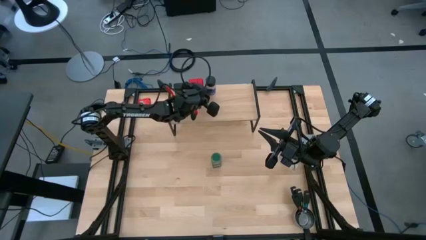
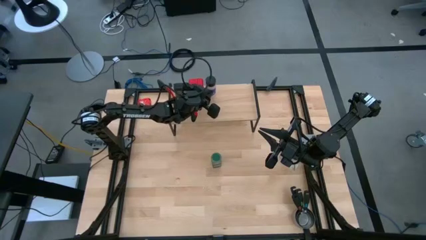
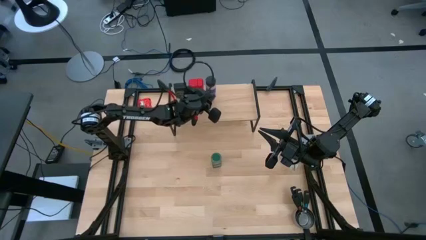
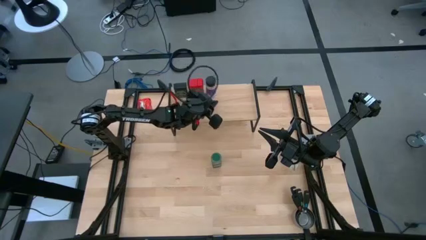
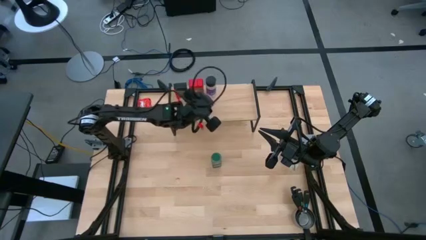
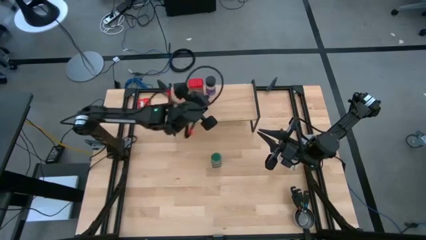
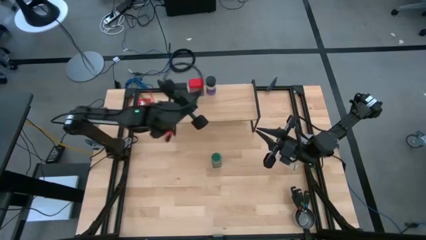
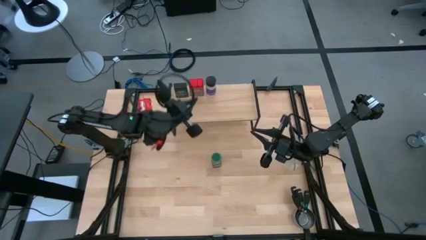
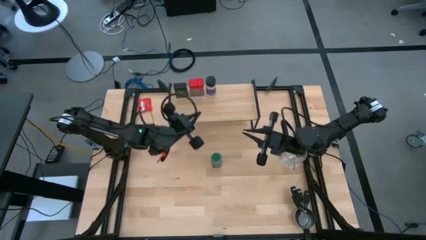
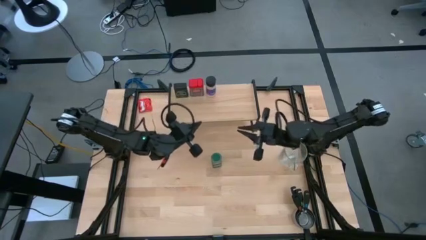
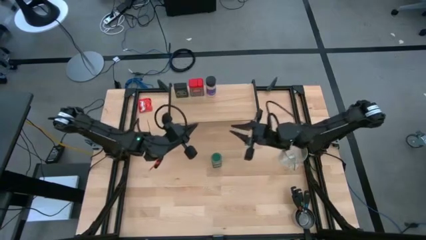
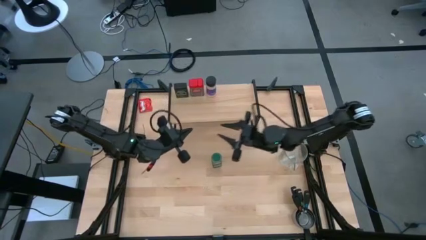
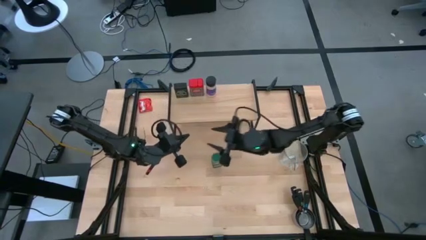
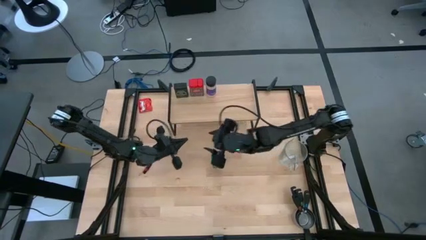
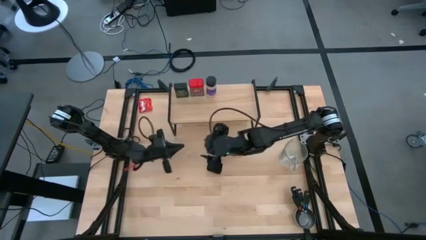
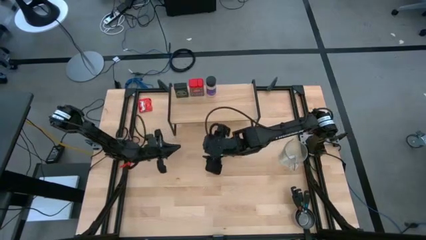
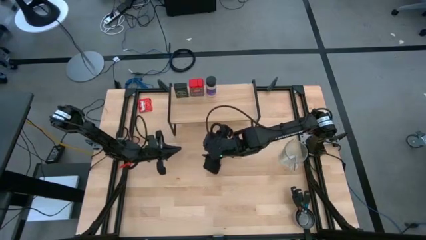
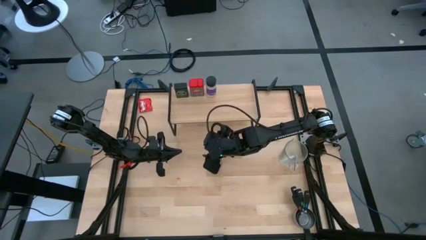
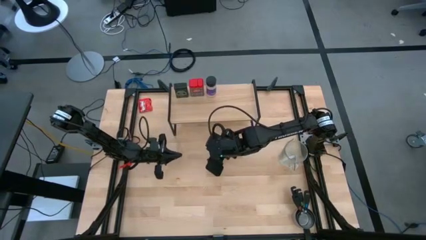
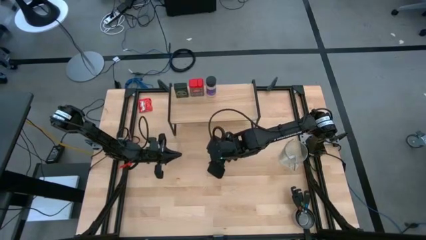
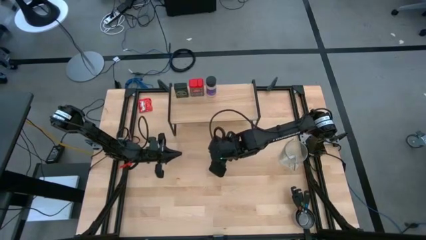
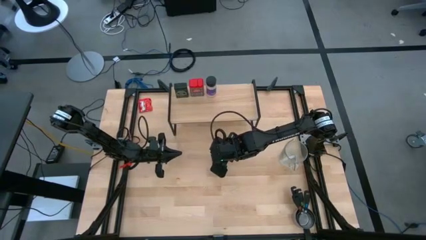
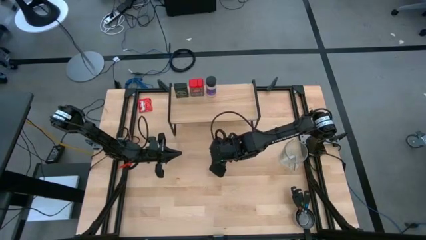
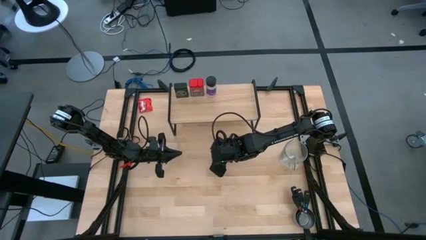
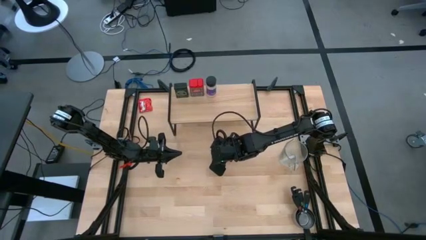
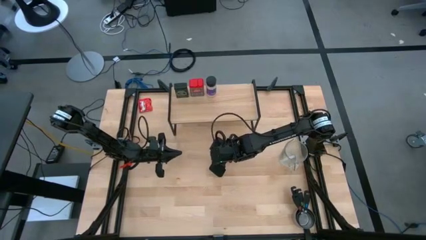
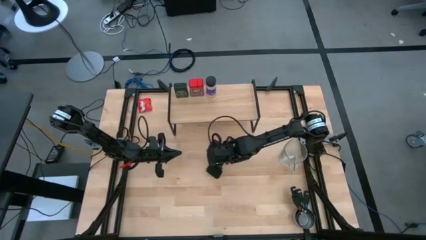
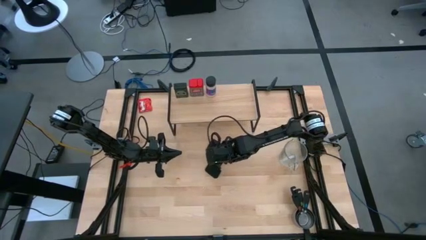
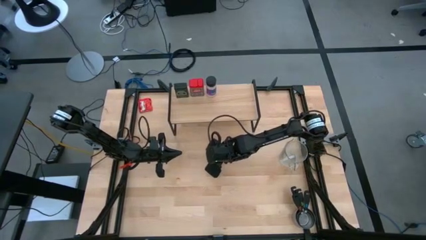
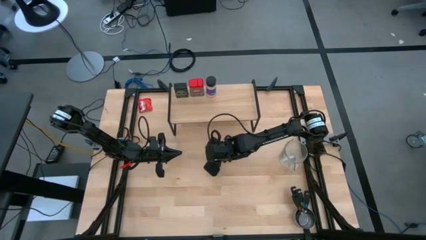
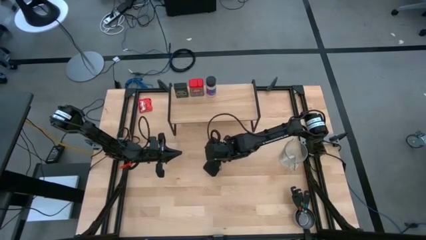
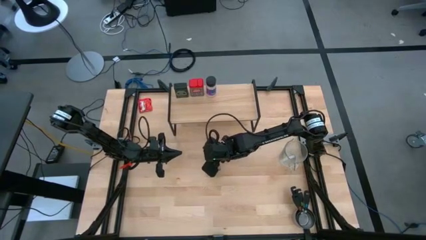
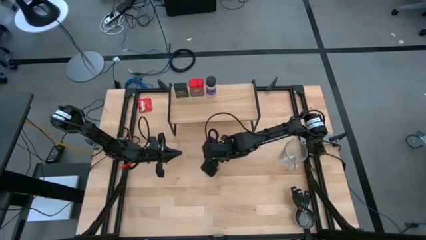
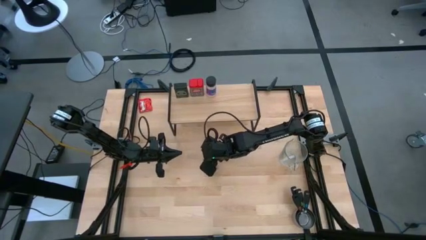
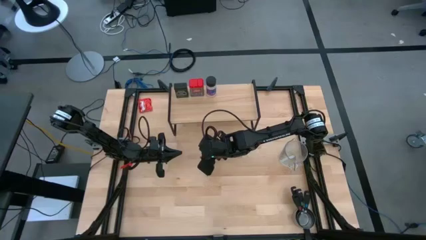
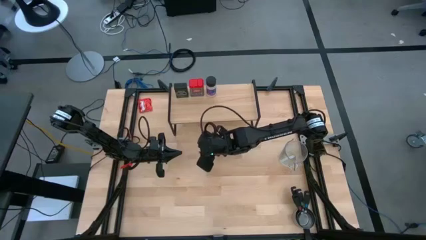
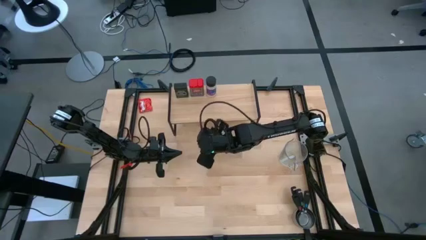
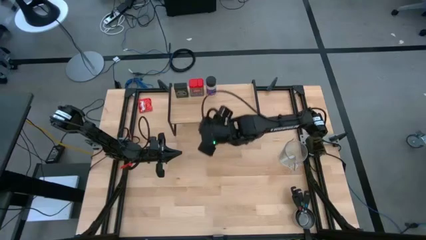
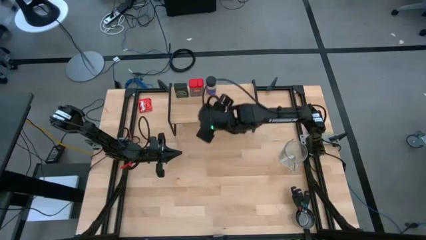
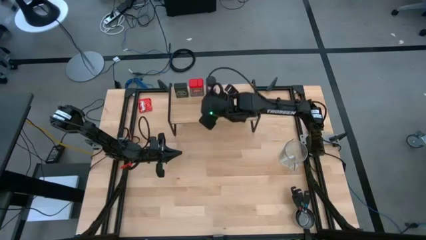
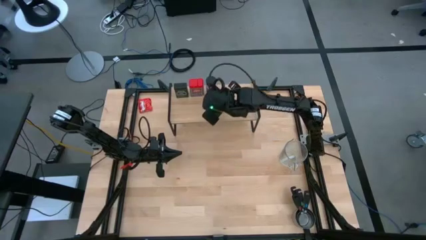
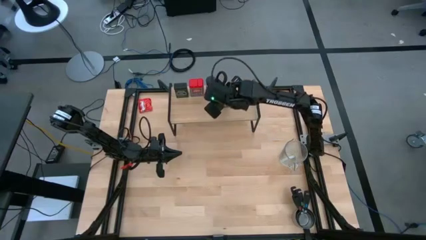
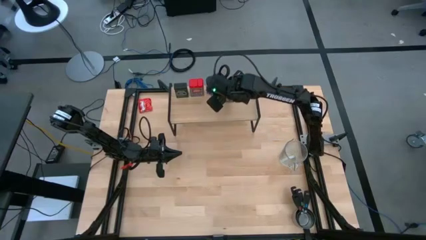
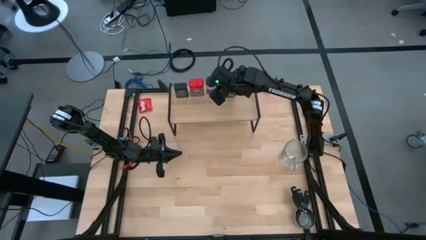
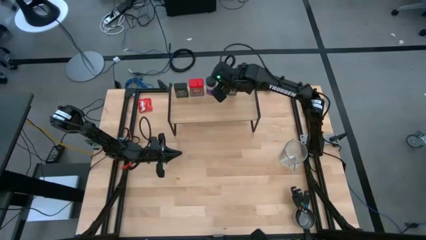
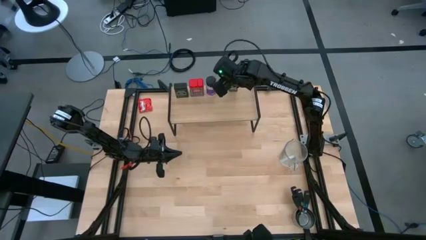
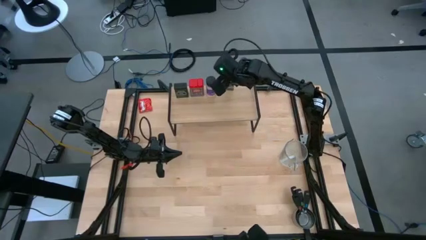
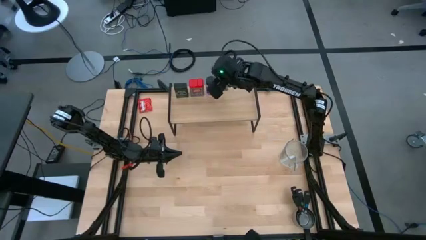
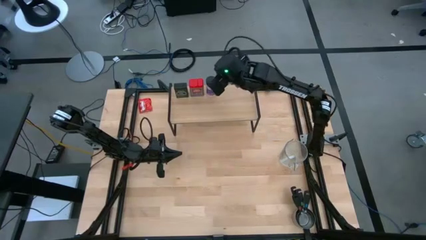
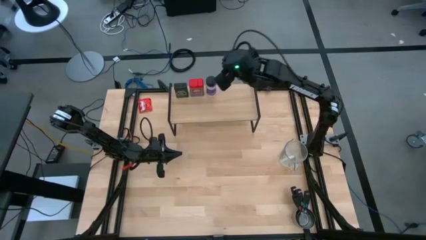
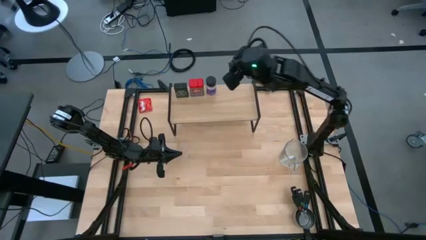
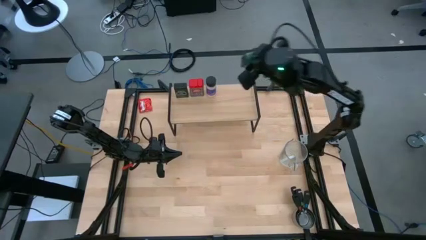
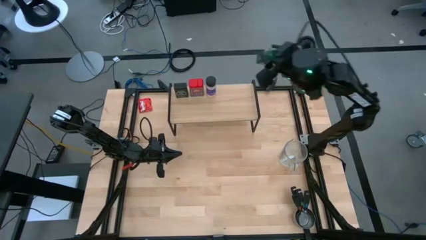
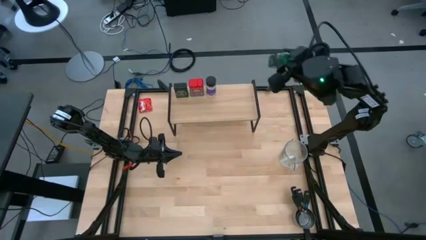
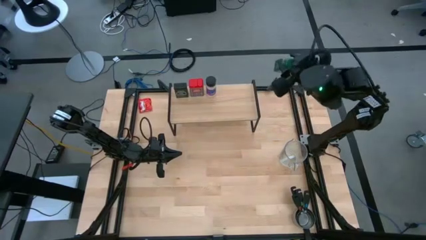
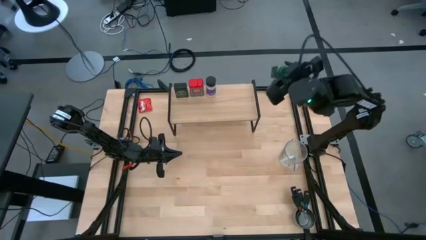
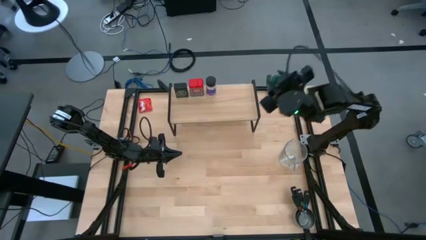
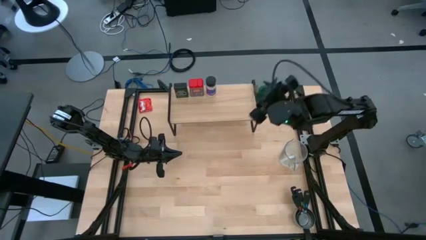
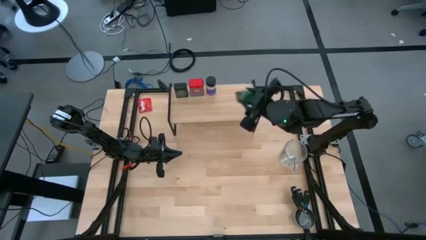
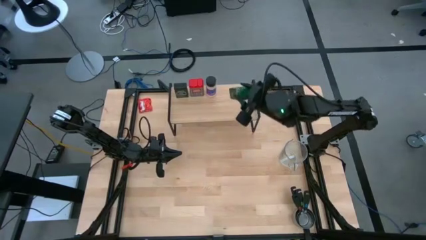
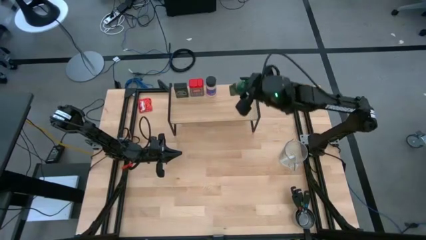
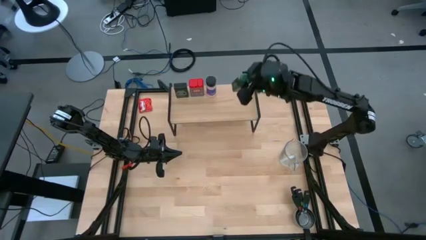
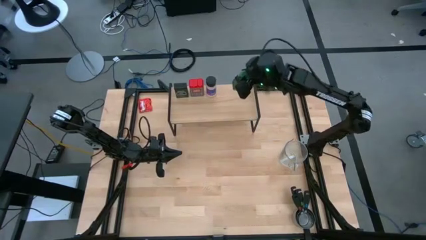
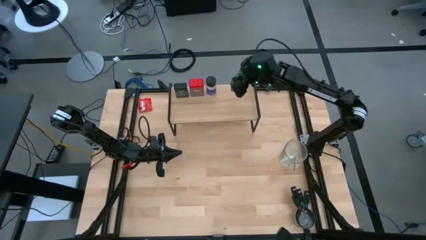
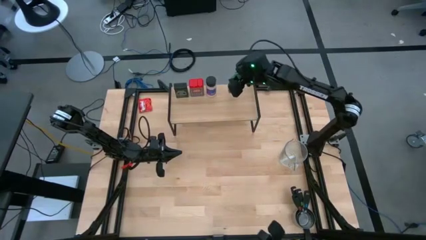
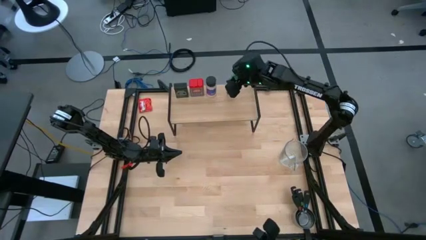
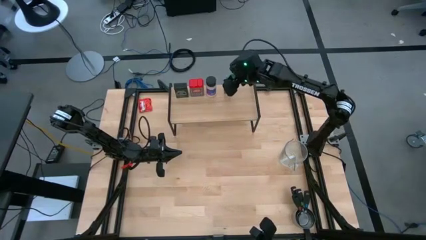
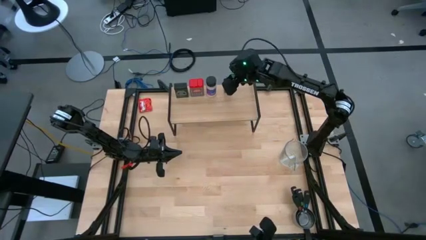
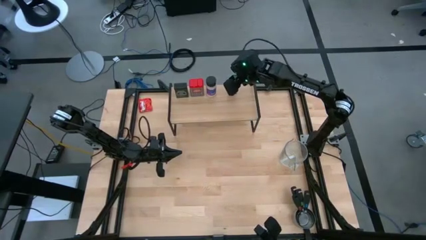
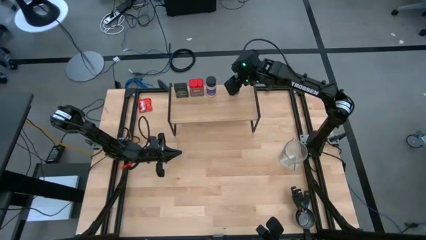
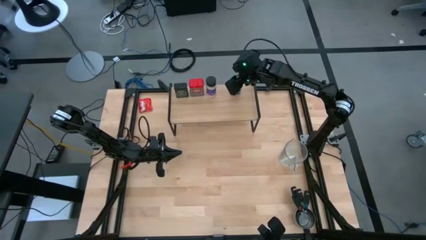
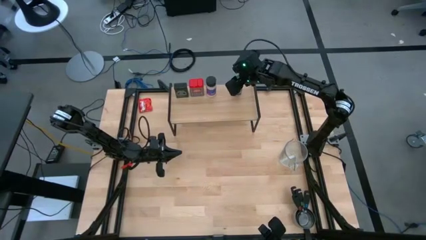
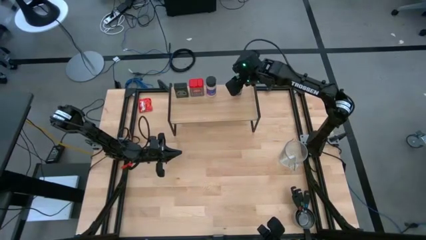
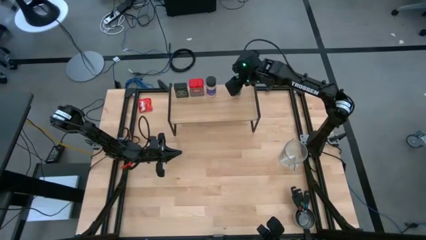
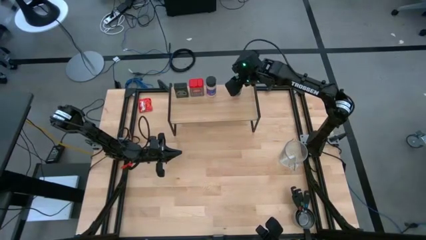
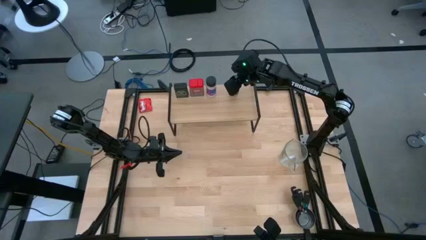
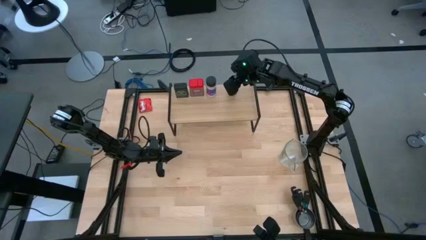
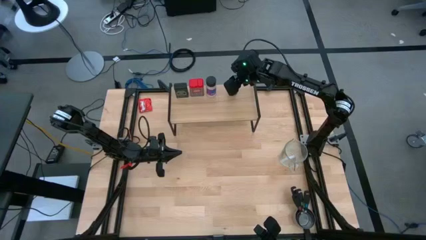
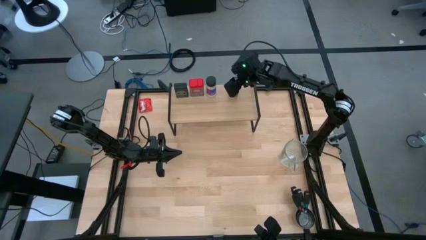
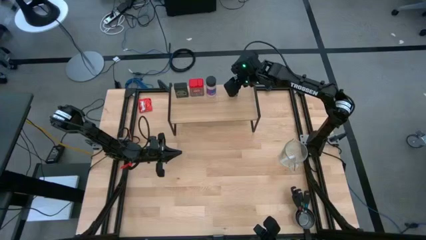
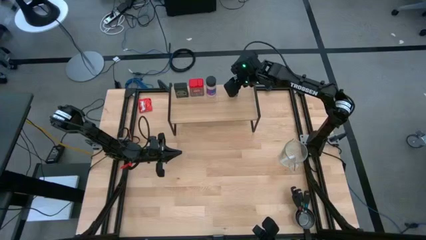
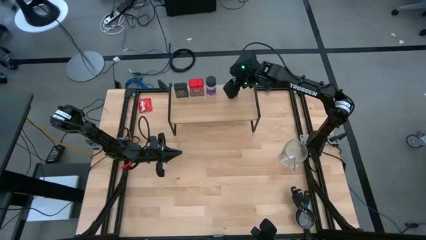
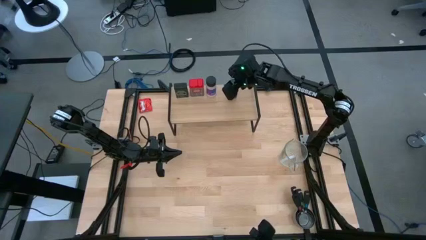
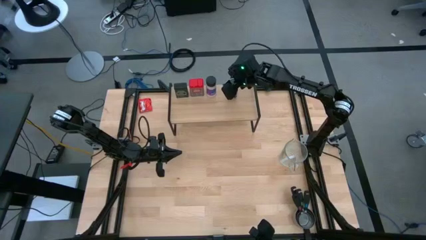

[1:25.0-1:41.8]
Task: Shelf spices
Put the green seasoning bottle on the shelf
